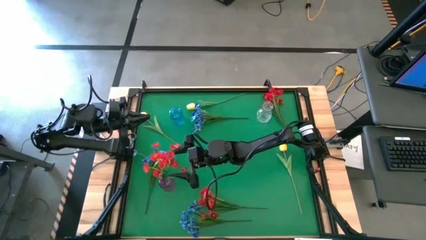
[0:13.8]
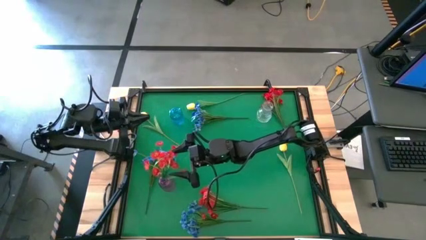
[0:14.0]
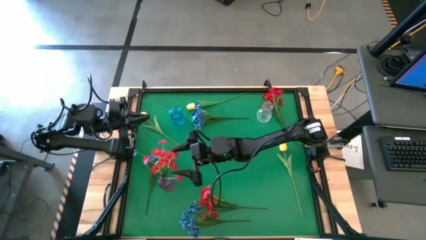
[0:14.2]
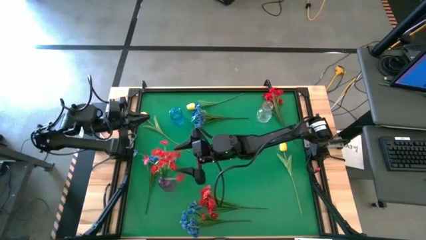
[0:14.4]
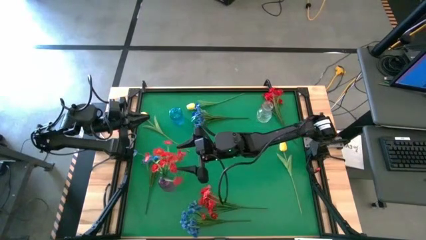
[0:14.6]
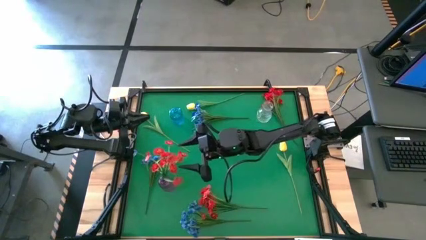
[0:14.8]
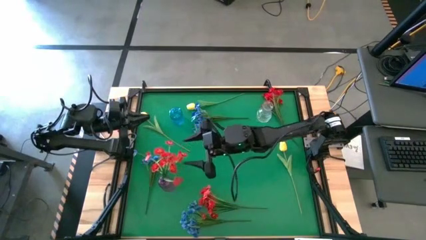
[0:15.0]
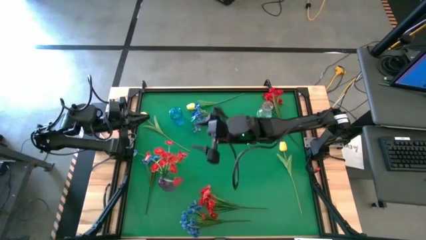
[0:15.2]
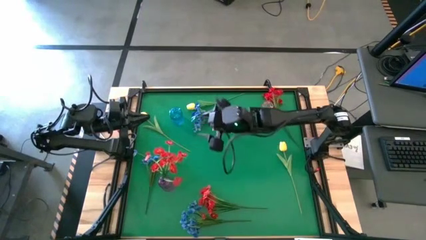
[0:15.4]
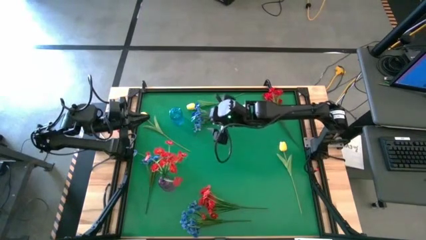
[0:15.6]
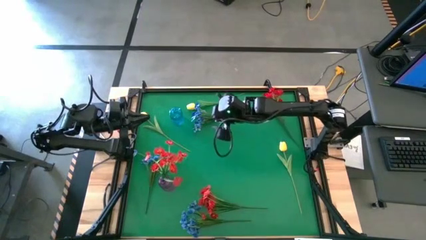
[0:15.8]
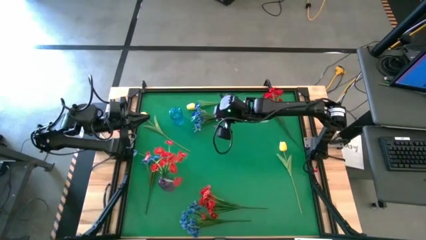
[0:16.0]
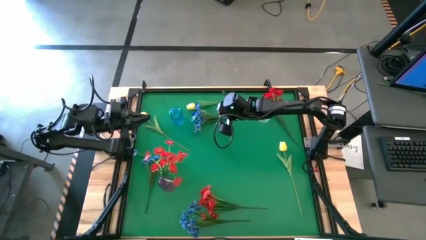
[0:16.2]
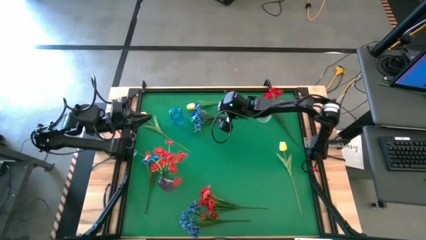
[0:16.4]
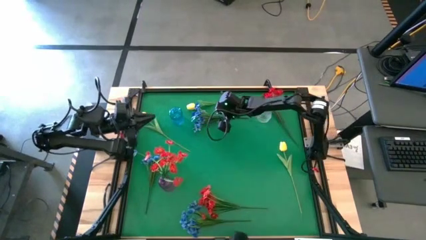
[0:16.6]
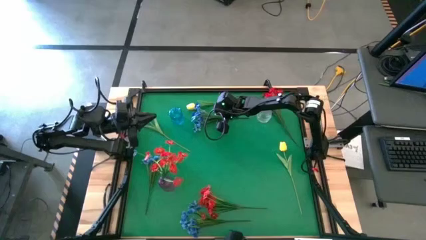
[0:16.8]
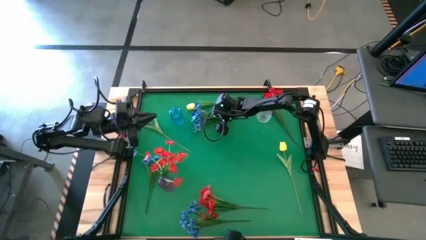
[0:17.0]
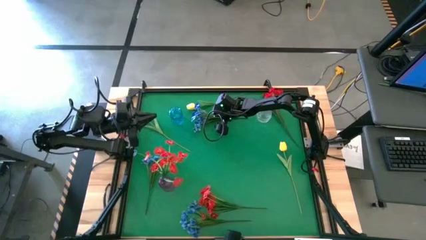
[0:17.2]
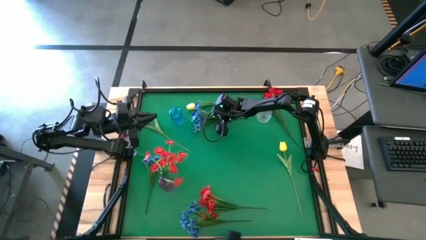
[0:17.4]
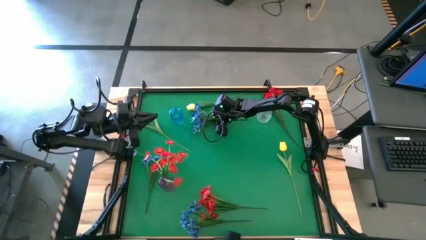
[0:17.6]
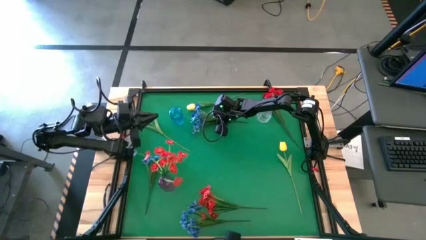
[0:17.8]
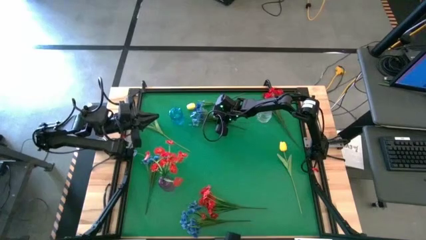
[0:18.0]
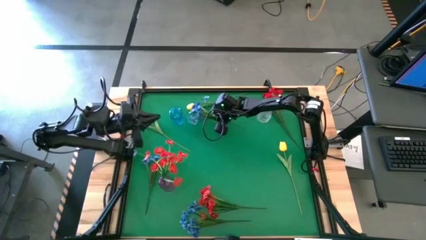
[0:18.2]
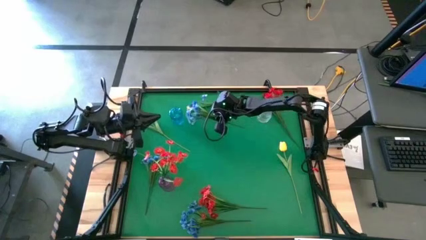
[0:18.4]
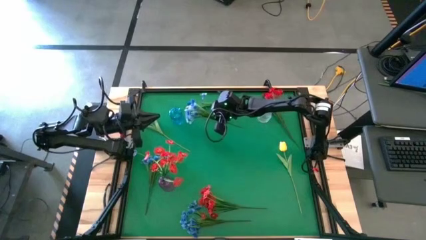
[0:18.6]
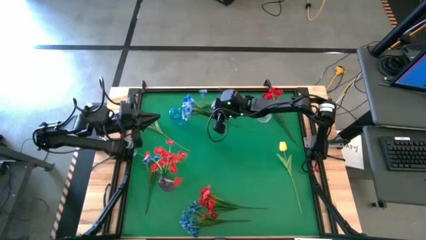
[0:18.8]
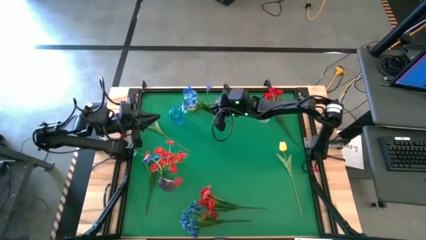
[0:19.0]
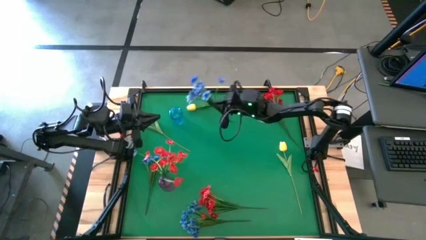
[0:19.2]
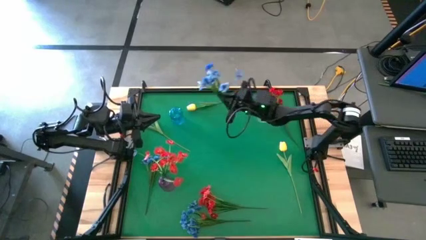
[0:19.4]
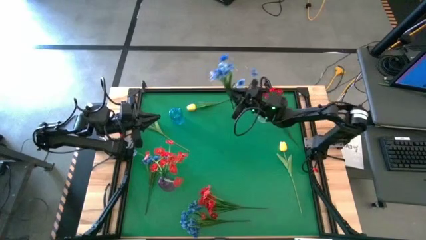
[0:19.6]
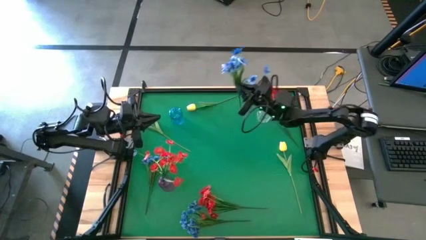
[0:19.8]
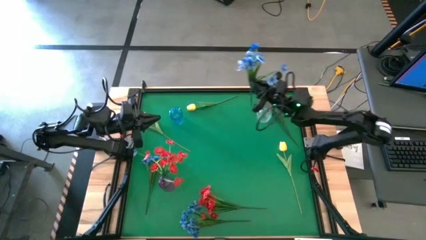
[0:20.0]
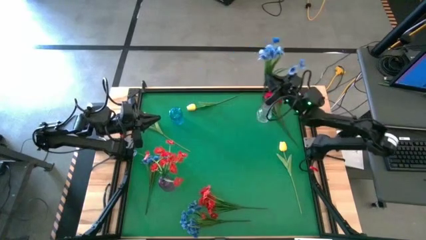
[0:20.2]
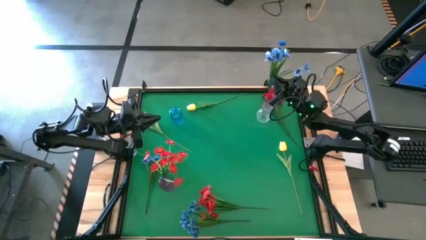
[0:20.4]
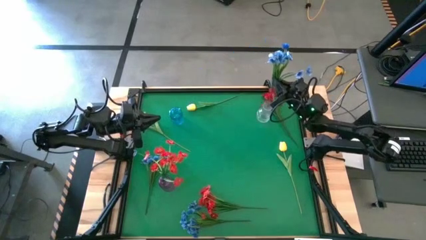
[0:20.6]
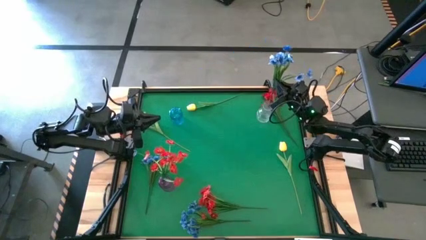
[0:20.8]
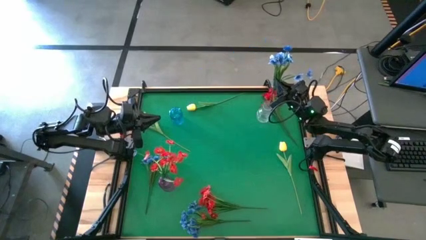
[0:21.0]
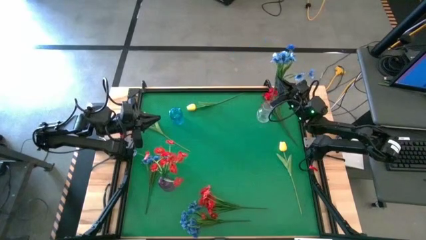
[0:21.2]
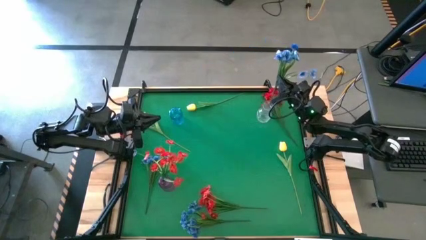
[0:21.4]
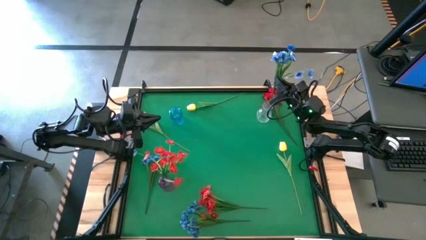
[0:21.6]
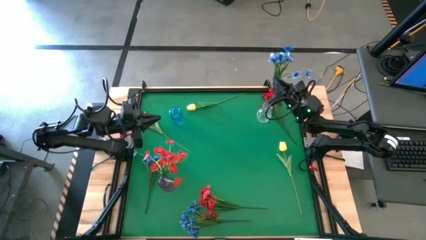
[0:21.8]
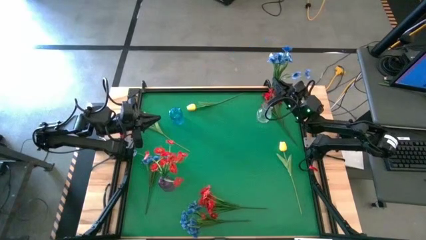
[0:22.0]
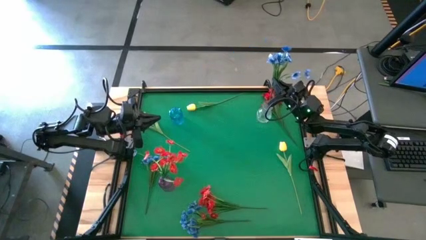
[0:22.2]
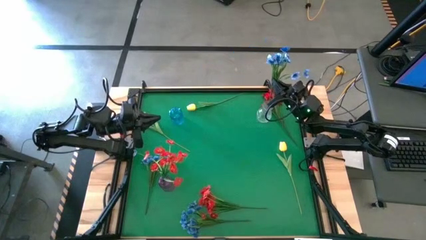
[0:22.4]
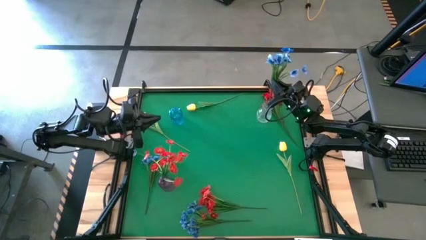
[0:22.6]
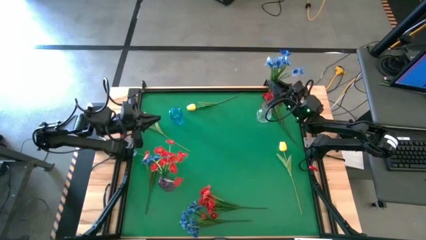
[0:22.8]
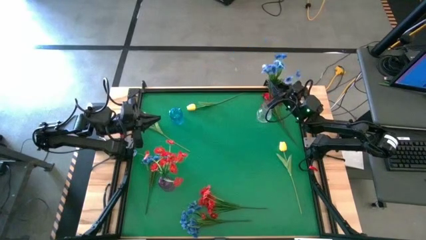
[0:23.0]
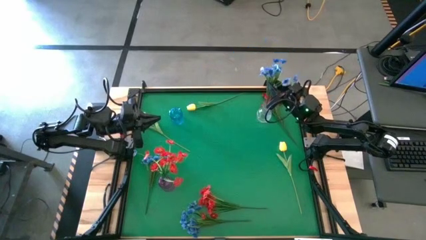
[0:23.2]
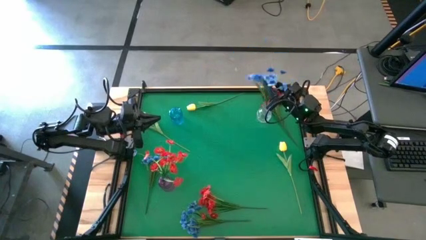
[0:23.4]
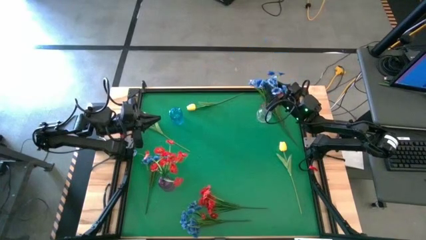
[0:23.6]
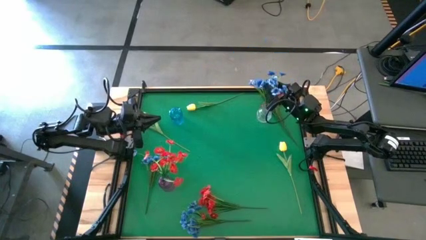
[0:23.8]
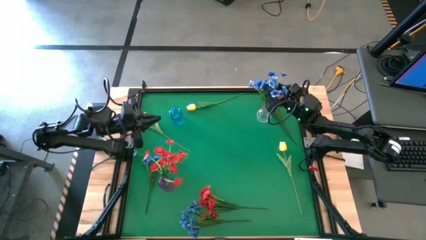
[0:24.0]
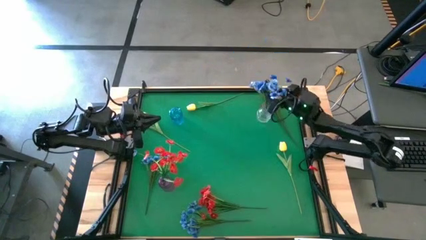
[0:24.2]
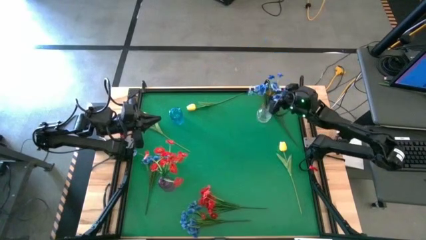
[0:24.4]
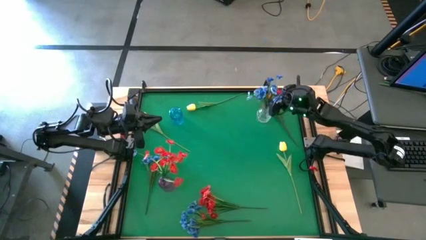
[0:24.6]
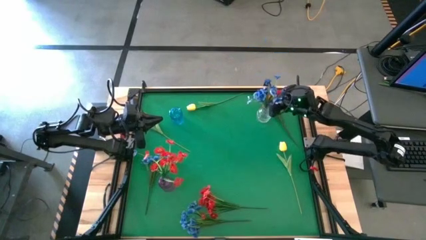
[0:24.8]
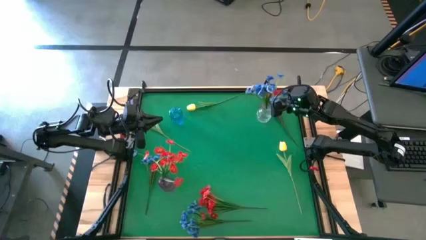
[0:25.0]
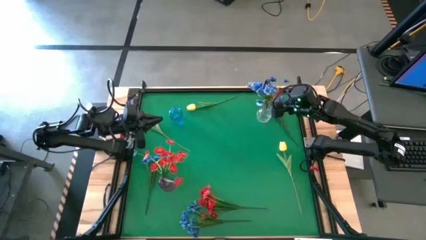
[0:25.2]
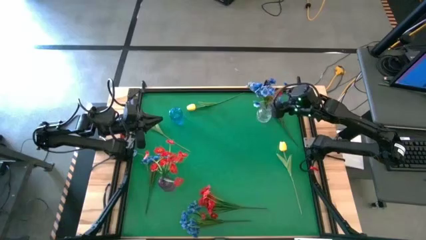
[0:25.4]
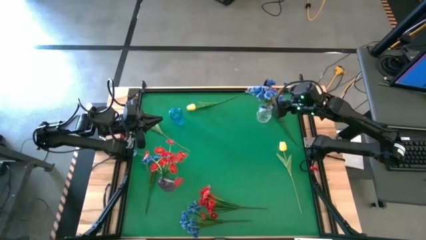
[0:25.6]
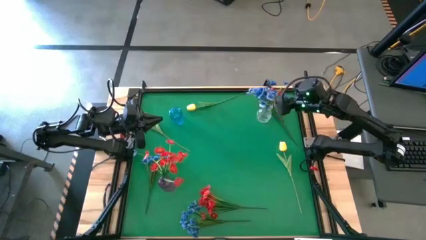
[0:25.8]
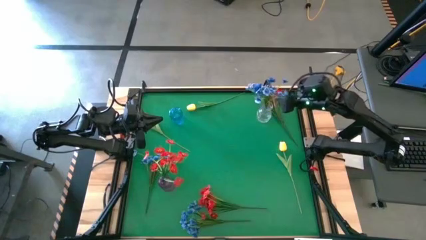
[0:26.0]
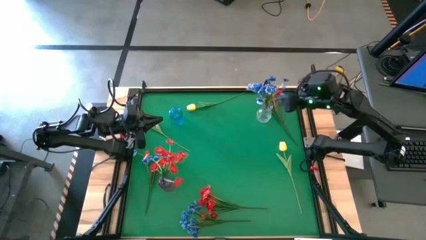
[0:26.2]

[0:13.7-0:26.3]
Task: Sort flowers into vase by color
Put the top right blue flowers into the transparent vase

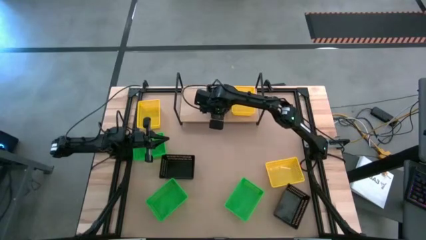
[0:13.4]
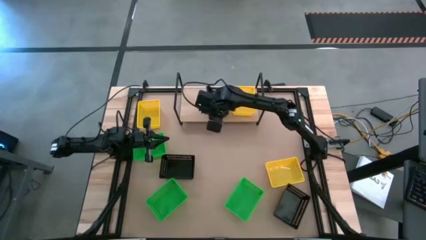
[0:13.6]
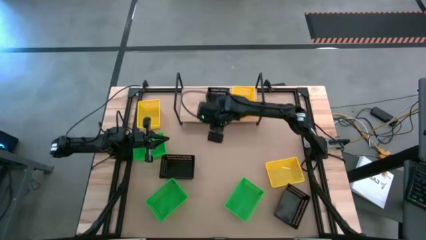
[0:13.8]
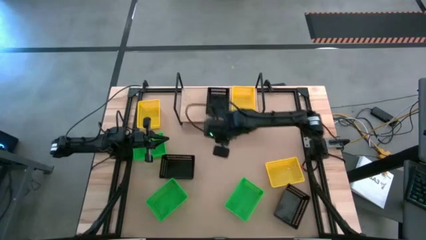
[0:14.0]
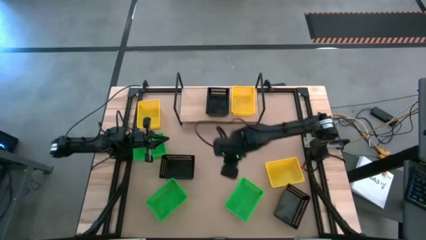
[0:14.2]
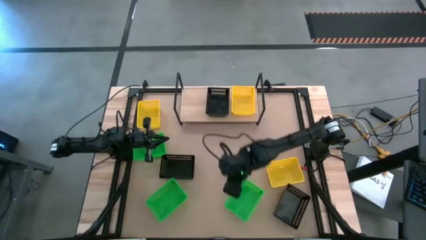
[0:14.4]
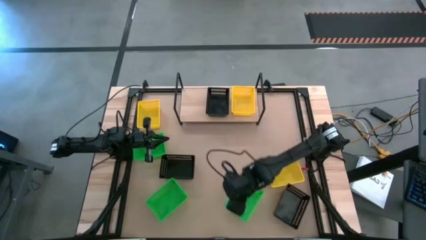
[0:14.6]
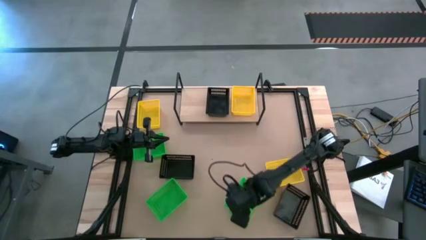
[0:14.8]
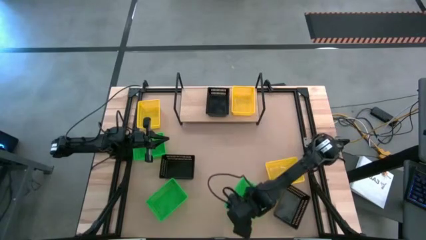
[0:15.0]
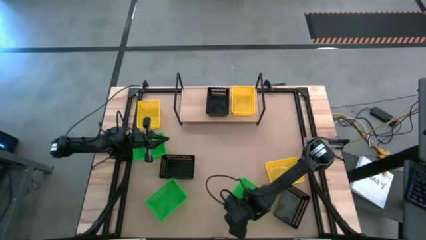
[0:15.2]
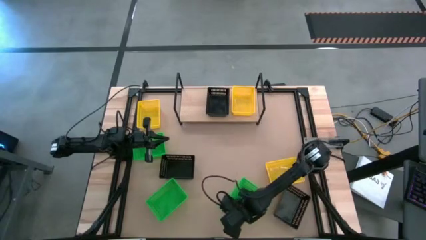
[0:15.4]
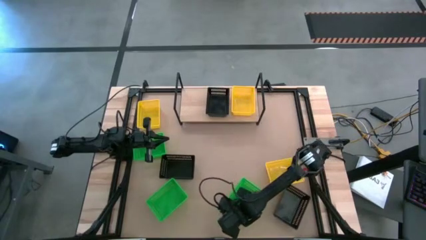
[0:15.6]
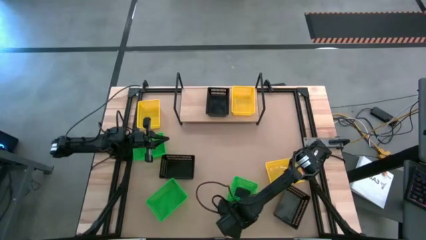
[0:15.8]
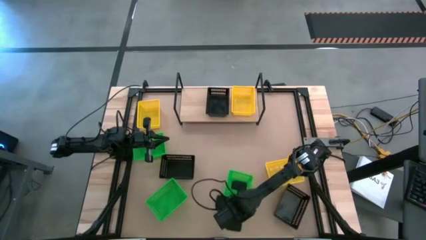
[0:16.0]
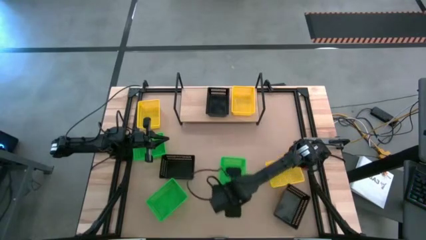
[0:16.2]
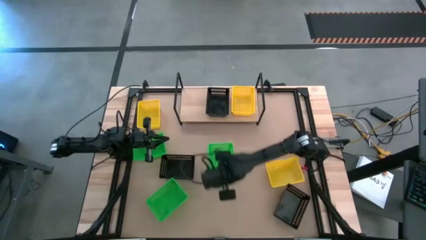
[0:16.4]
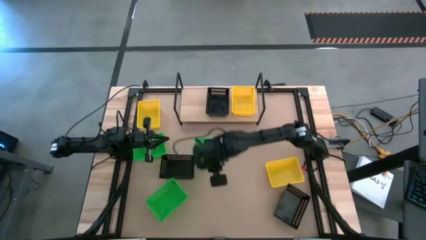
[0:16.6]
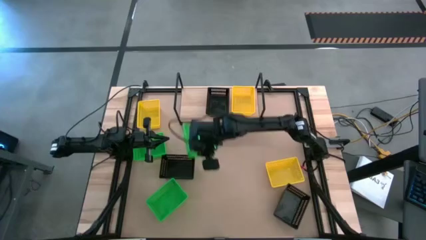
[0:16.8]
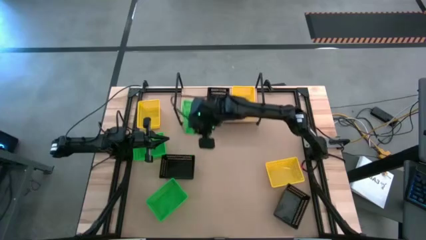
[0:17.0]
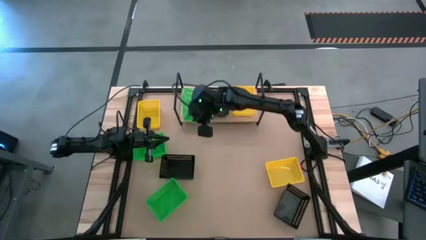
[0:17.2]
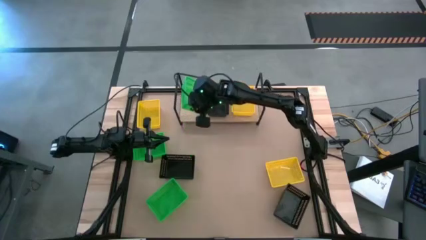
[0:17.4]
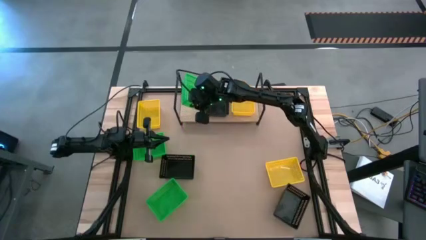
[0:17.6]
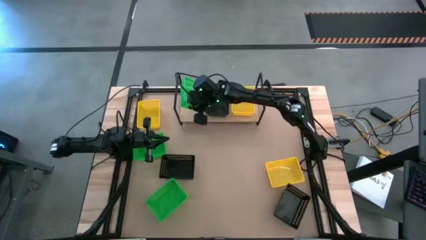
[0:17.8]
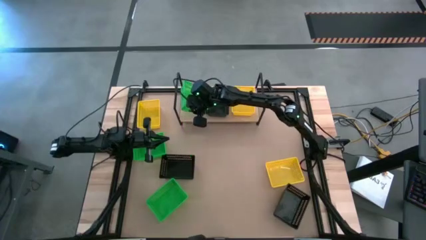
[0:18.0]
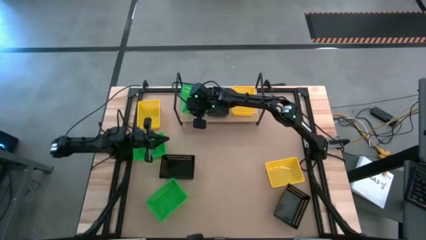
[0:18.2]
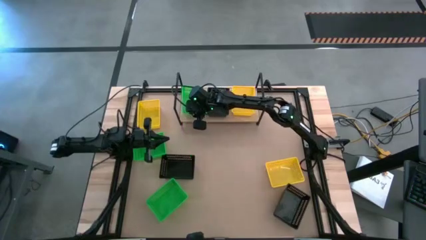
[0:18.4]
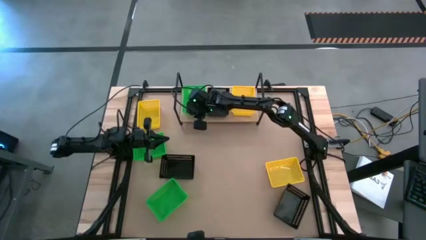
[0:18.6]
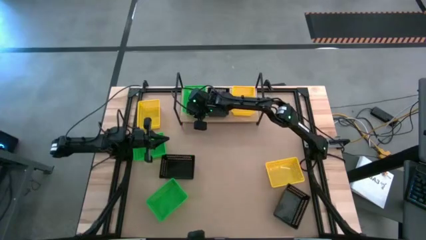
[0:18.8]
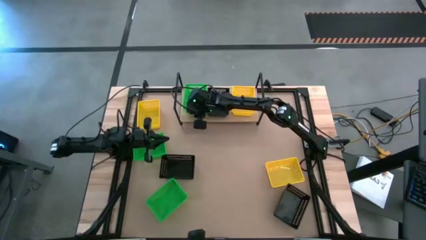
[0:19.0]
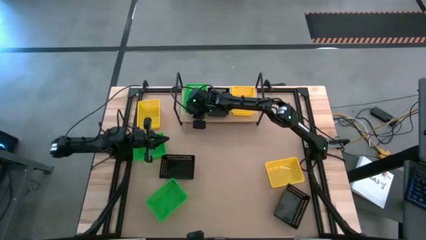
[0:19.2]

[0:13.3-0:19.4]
Task: Stack baskets on shelf by color
Put the bottom right green basket on the shelf
